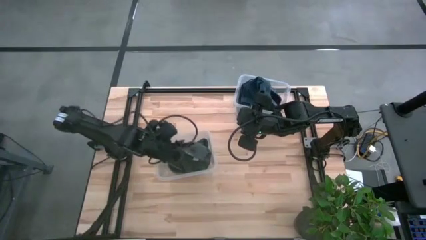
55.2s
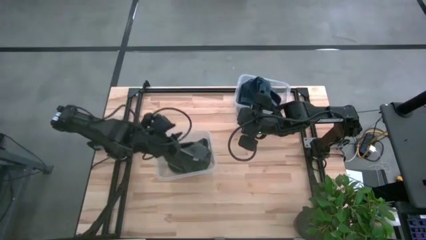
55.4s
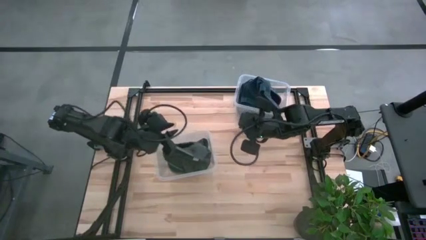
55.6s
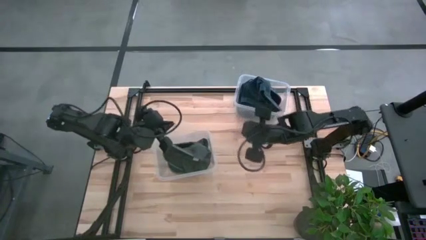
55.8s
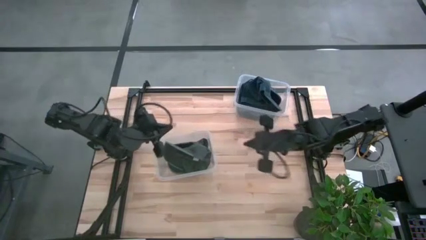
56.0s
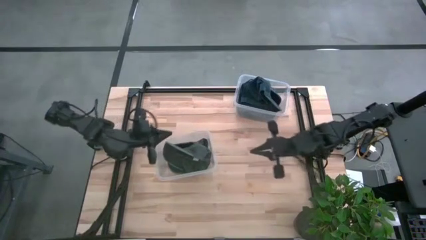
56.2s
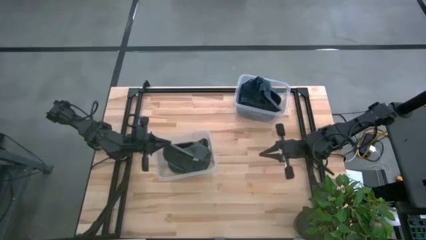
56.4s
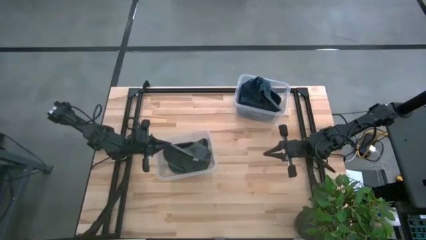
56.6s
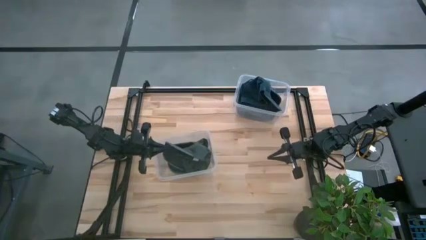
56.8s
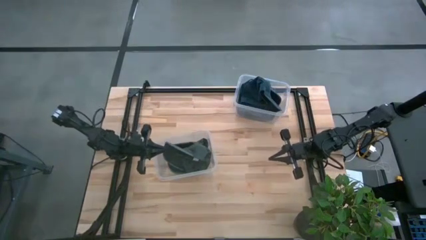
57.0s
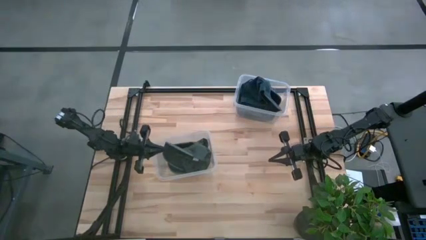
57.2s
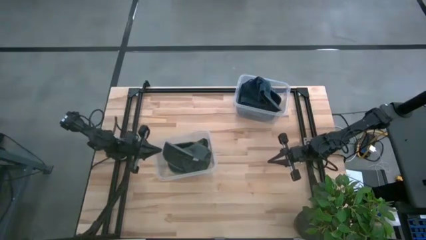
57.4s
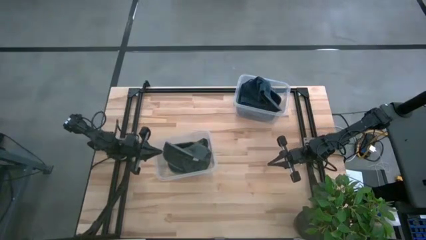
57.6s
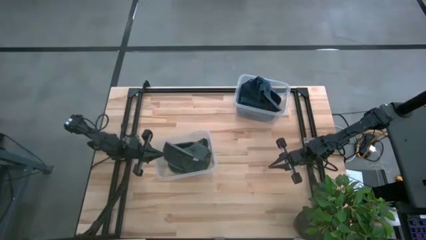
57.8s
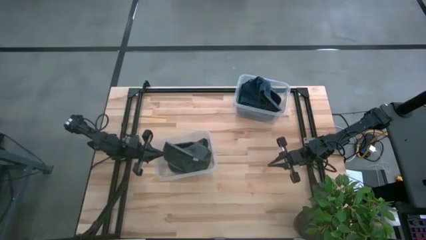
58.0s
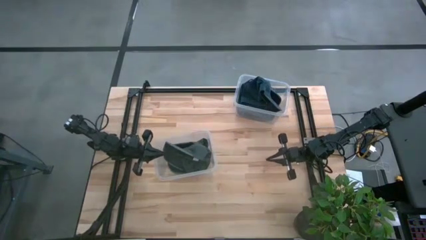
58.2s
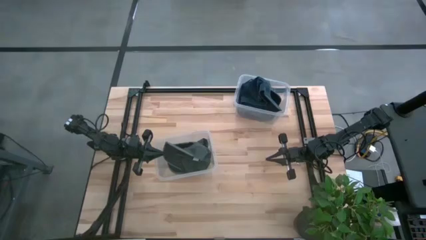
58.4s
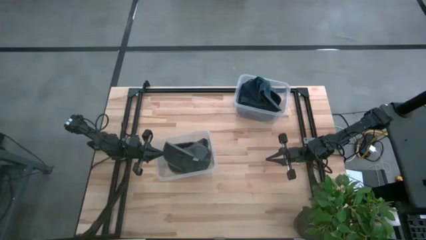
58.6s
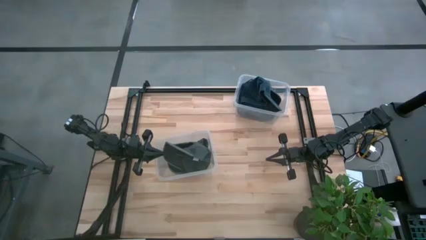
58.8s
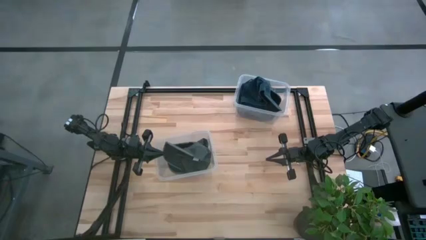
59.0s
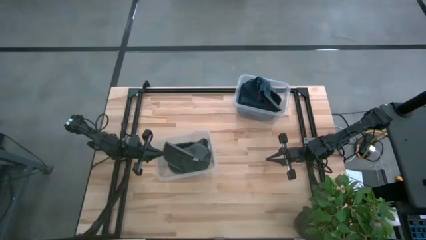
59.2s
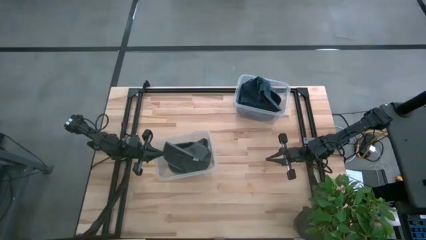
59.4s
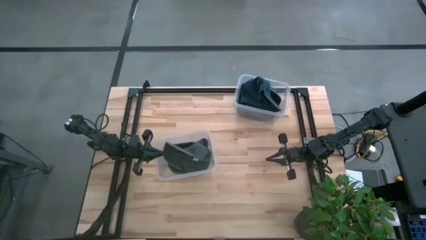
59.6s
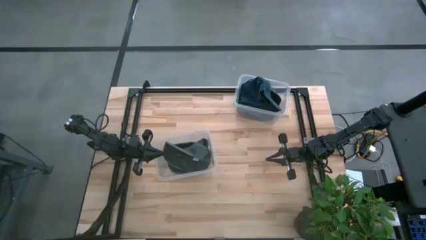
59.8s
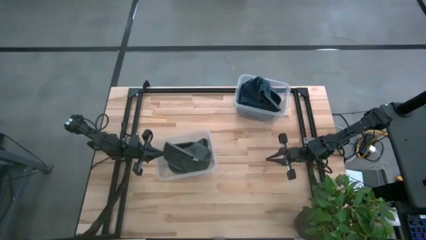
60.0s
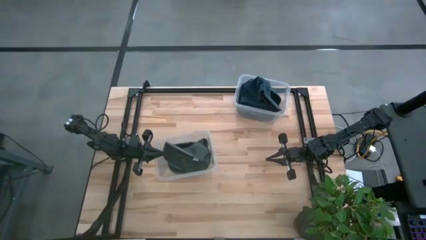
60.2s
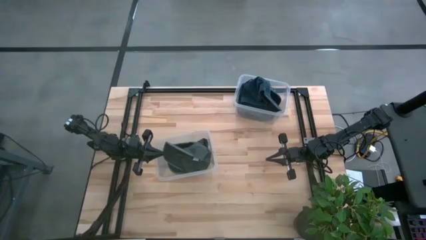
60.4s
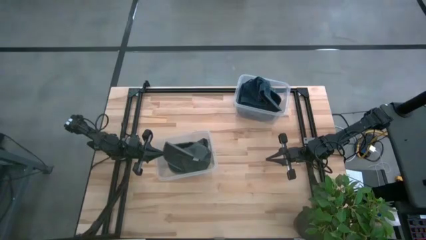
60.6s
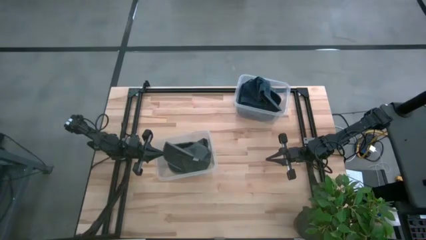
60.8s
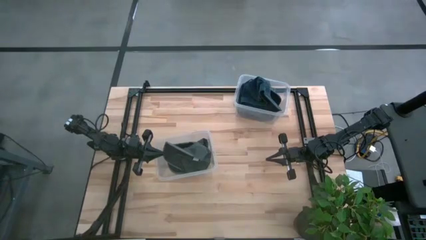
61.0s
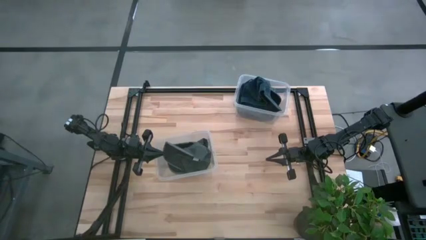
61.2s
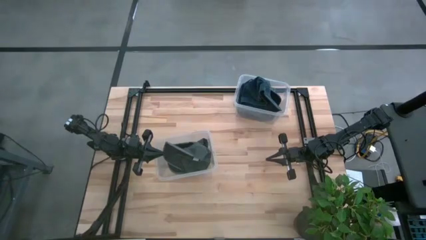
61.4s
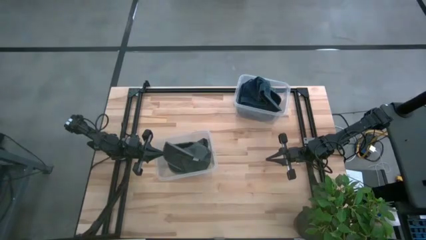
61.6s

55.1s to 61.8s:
Task: Pick & Place hat
Return to Home Position

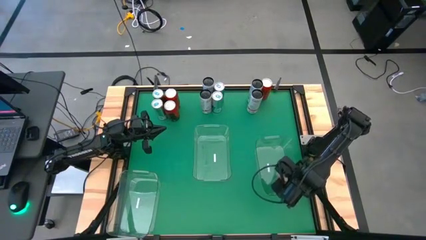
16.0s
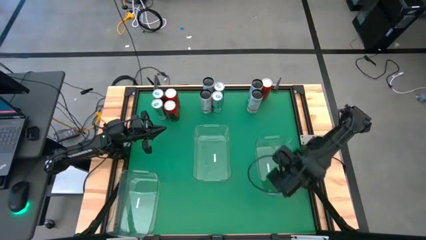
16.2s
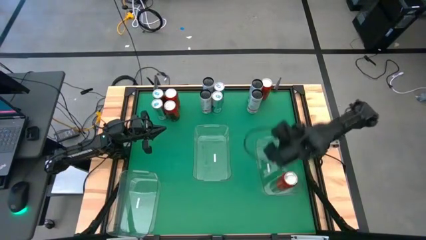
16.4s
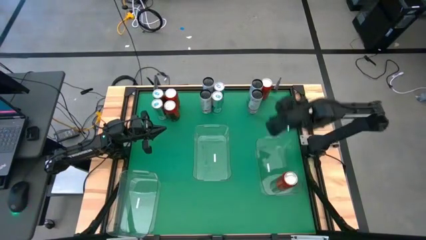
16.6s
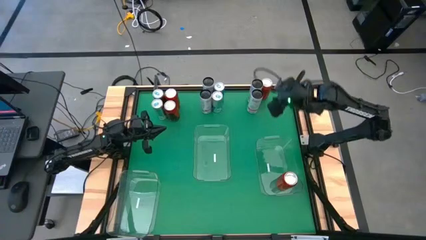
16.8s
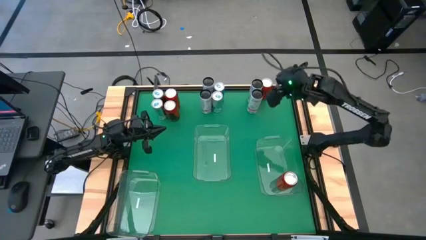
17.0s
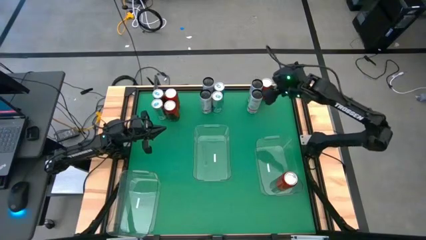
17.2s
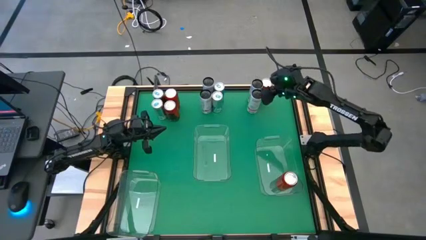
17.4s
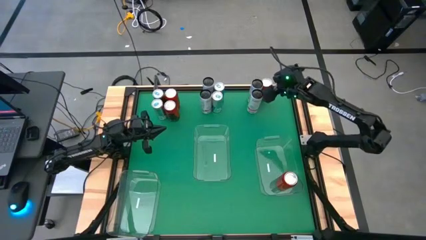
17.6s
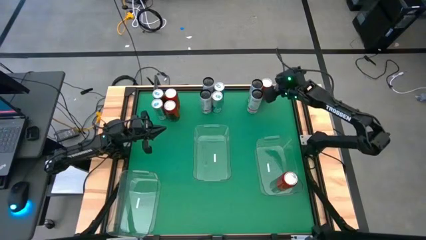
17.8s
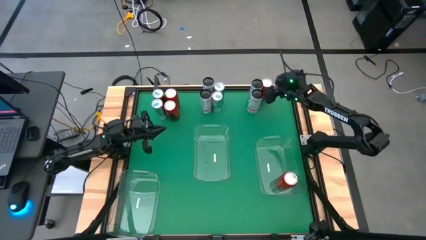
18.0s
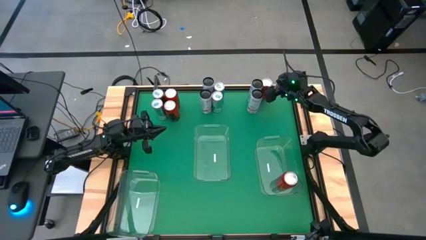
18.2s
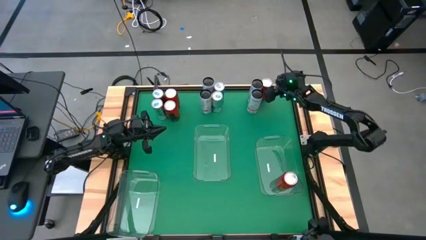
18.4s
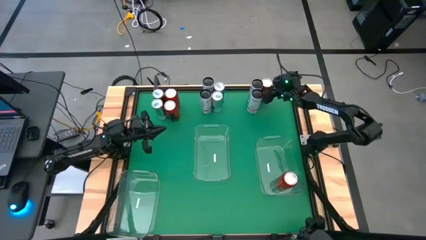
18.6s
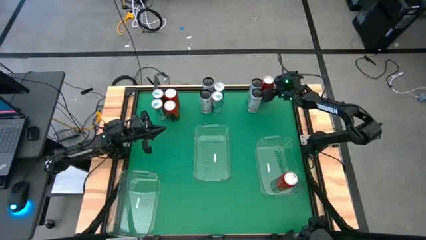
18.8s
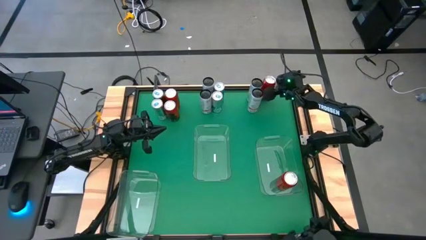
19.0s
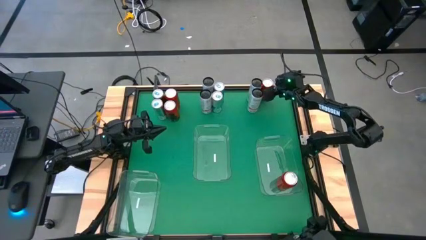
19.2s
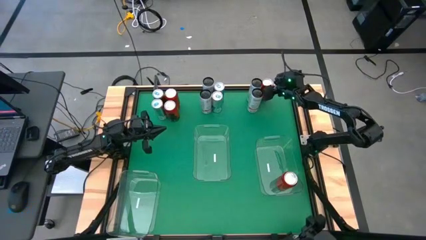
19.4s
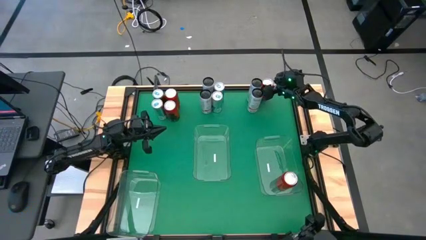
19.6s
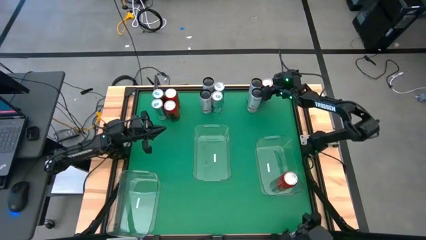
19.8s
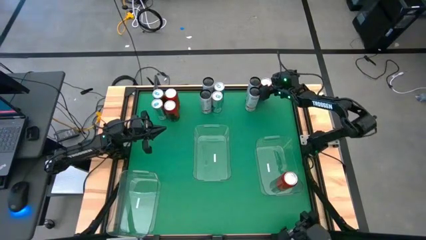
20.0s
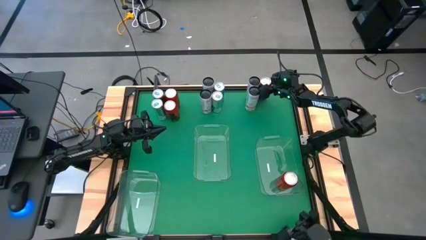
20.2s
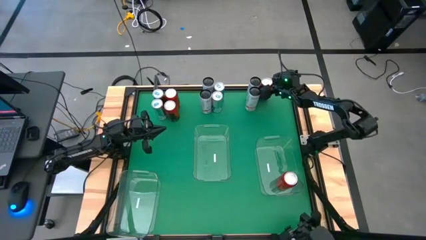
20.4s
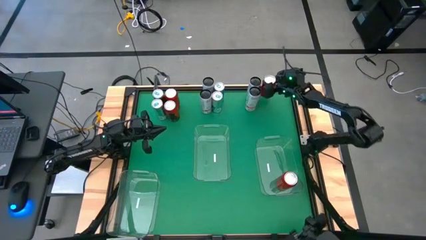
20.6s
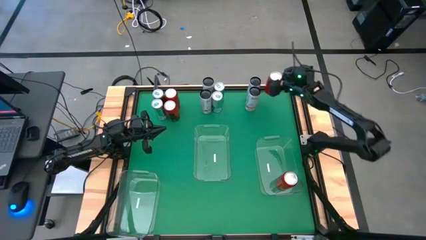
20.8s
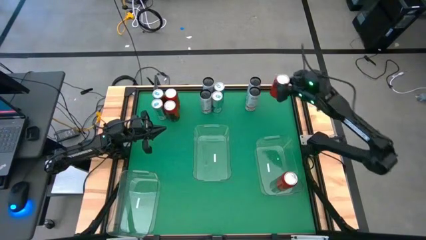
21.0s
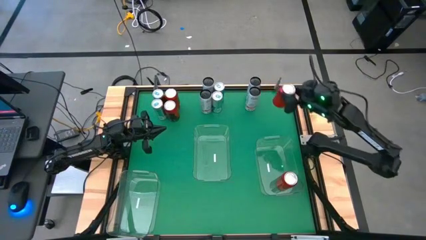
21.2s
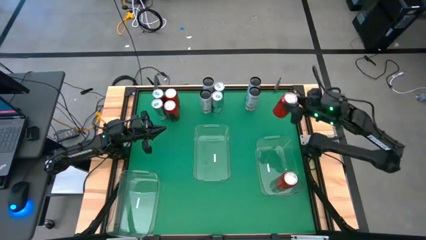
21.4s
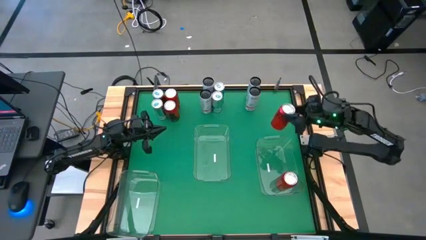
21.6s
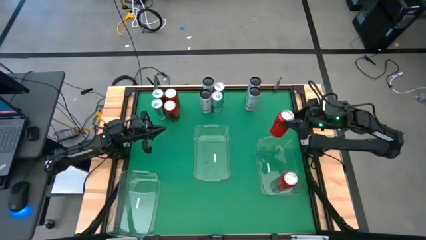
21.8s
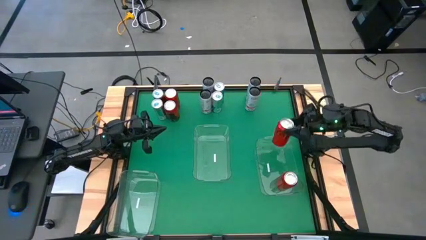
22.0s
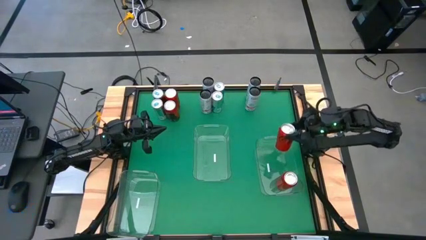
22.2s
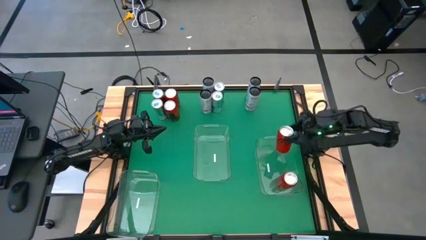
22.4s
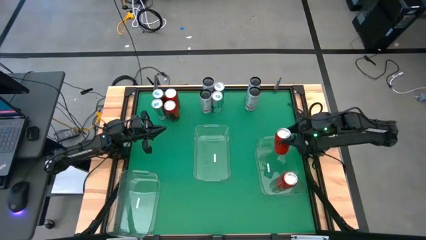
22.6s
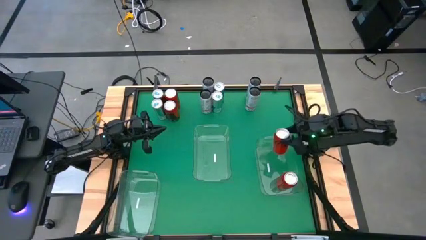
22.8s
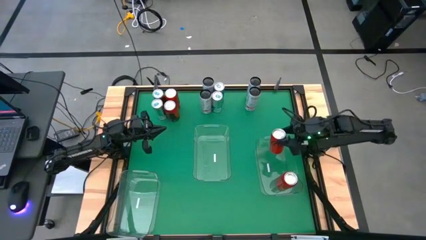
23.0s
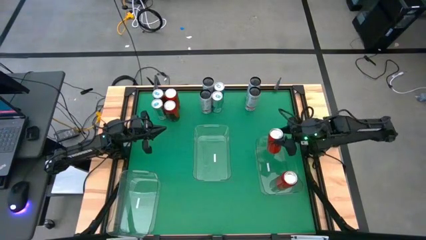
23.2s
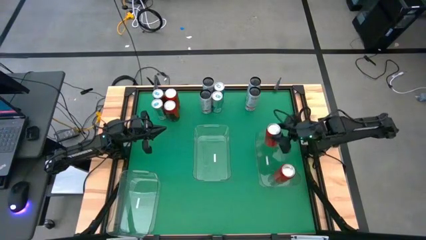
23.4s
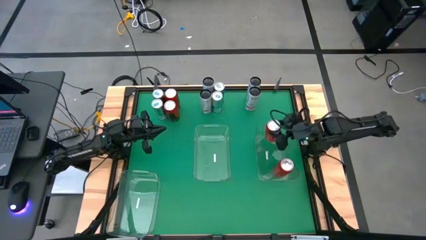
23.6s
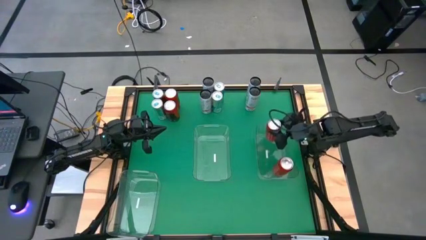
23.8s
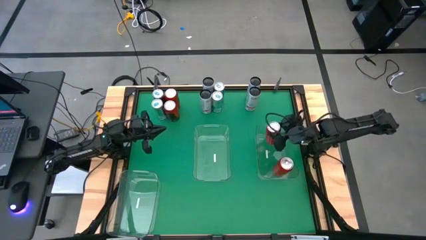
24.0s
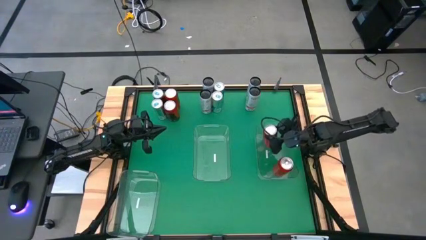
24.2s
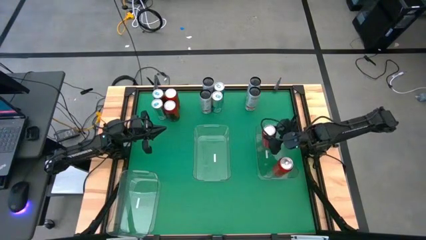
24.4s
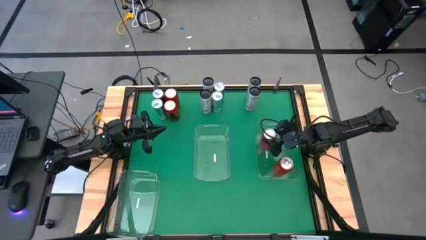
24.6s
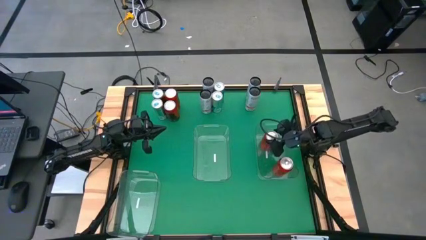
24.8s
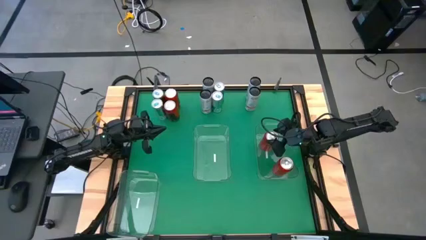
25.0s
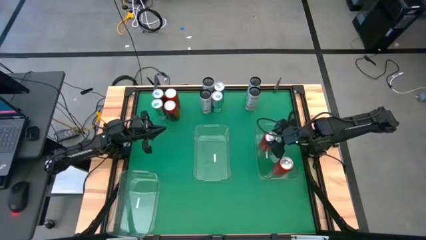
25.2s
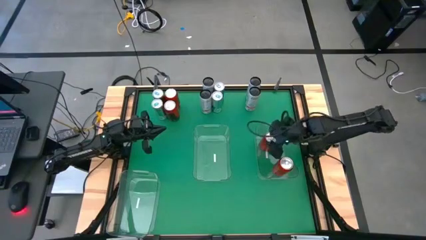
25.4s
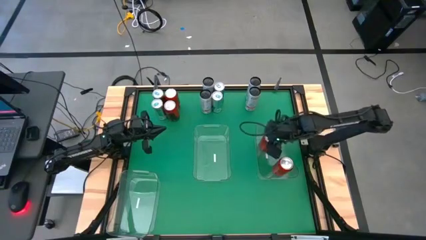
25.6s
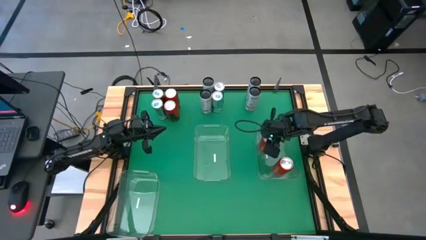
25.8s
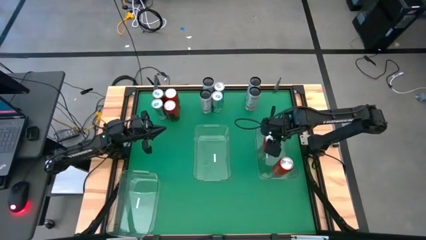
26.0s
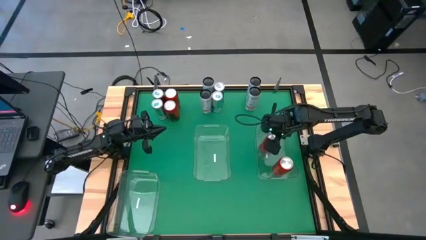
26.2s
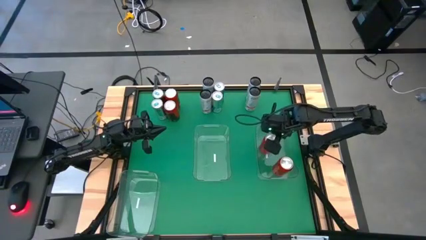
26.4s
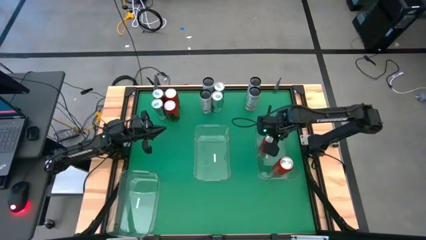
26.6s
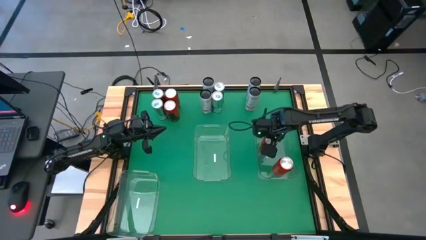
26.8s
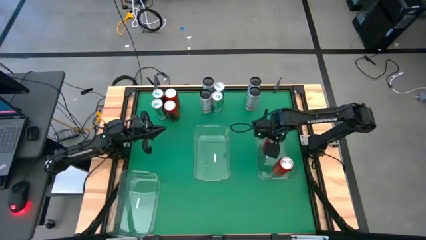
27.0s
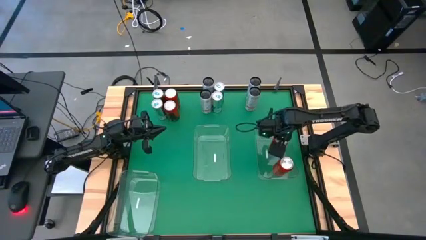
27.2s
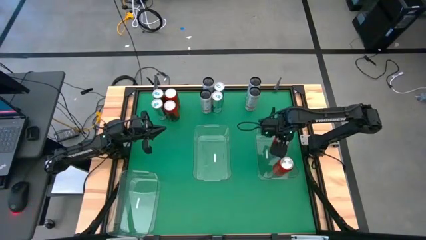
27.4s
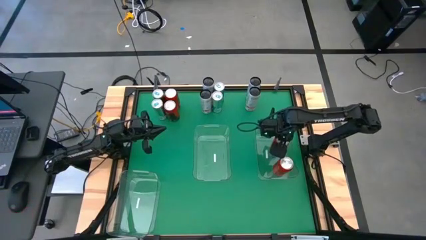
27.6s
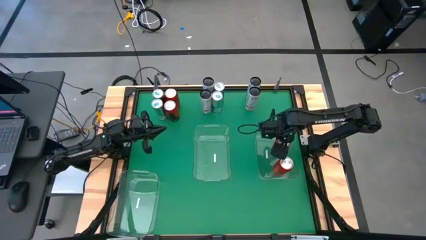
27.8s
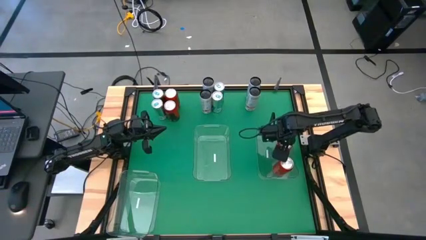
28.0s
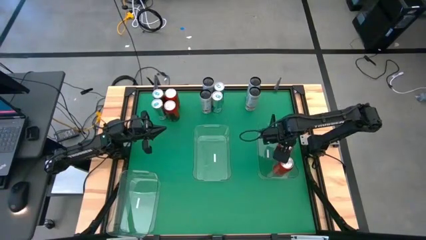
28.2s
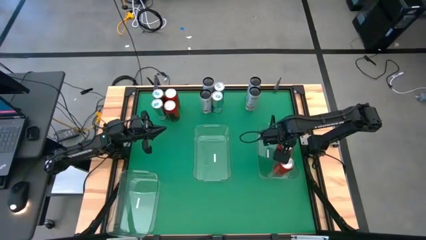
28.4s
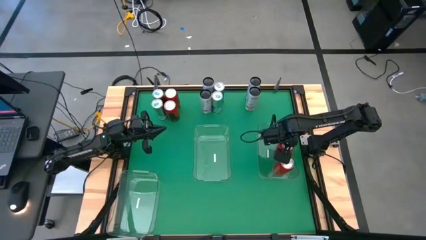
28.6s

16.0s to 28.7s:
Task: Sort soda cans
Put the top right red-black soda can into the top right transparent bin
